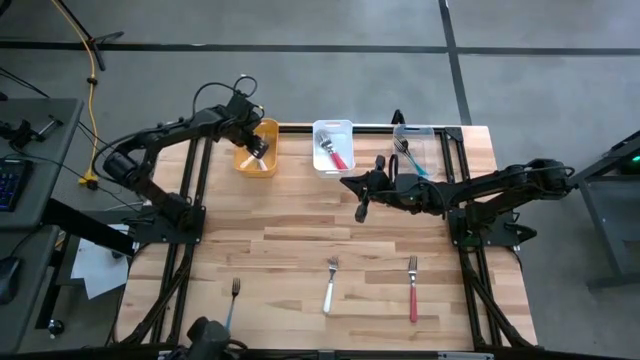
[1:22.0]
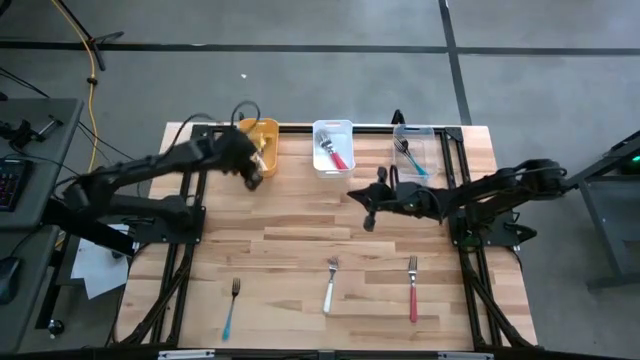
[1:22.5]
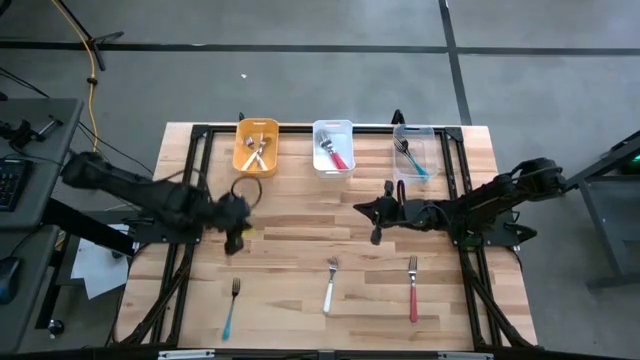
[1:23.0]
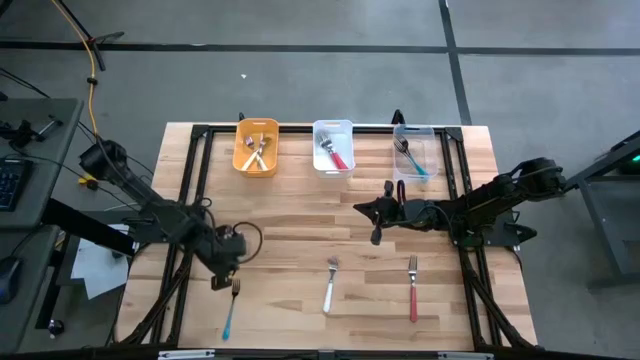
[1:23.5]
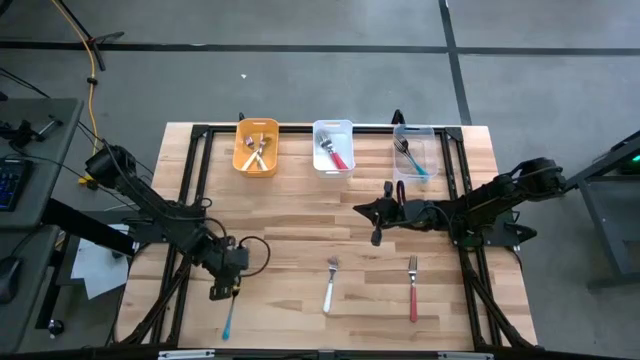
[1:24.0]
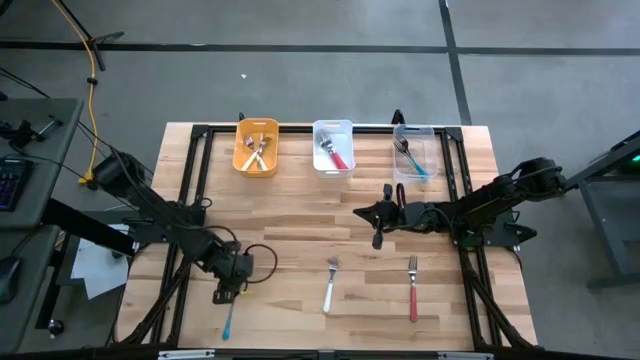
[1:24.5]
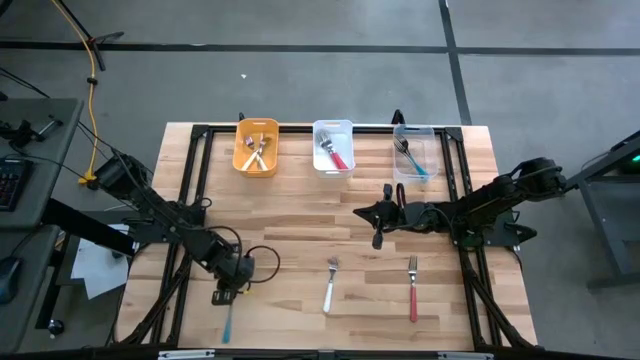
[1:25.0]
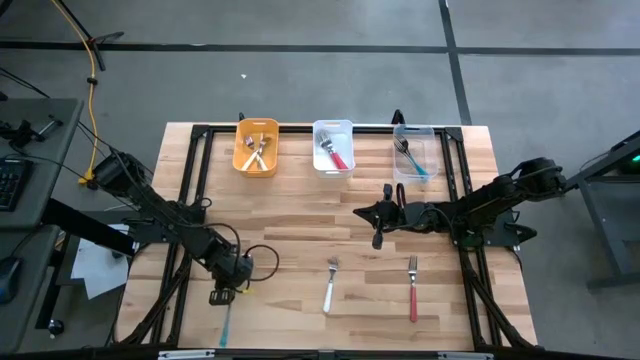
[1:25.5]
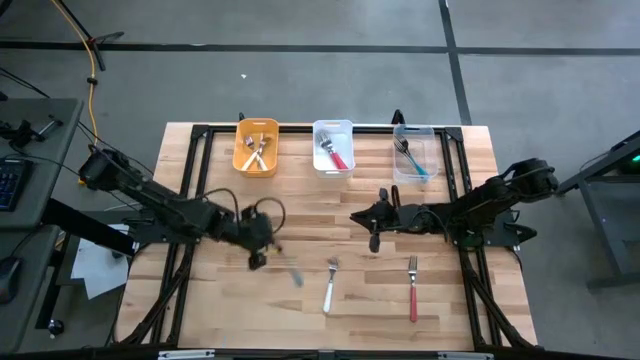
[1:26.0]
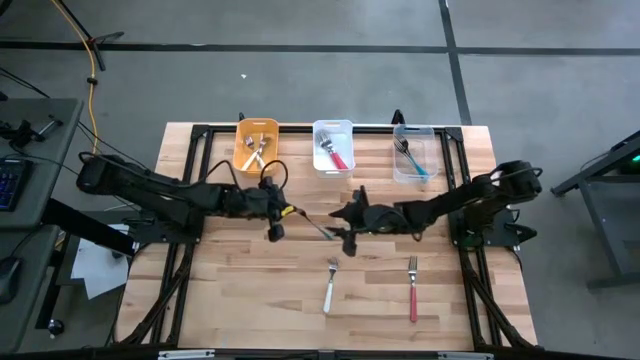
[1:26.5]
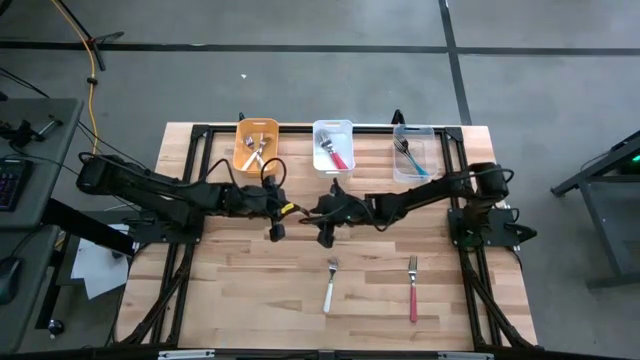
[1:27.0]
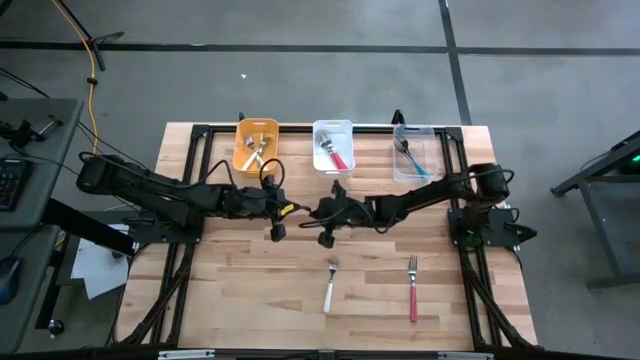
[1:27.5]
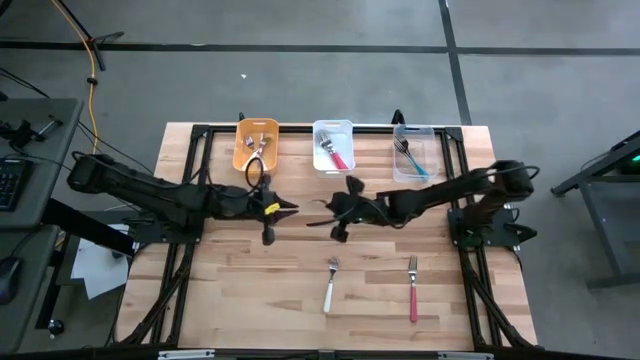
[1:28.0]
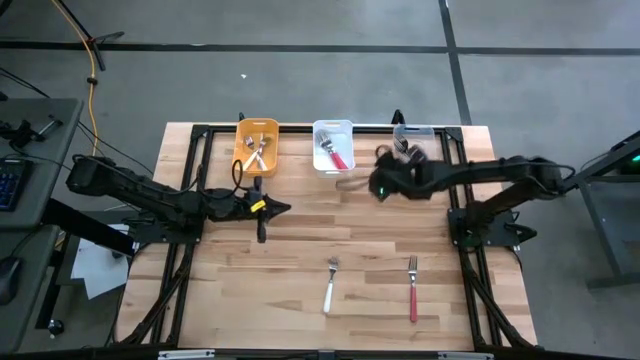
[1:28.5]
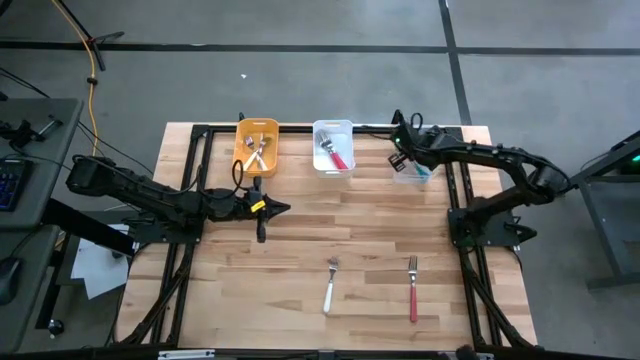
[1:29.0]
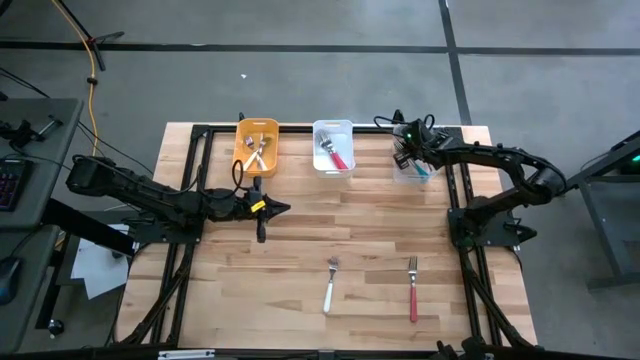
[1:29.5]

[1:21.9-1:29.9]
Task: Sort silverware by color (type)
Put the blue fork into the transparent bin

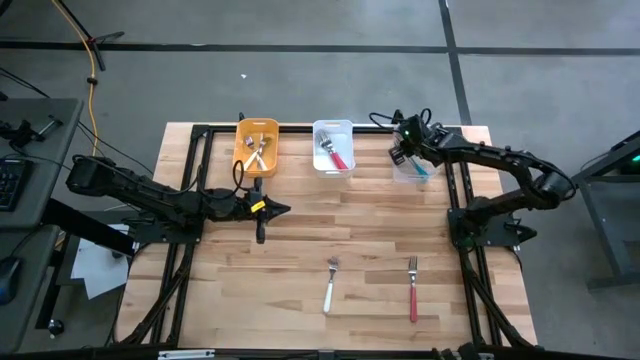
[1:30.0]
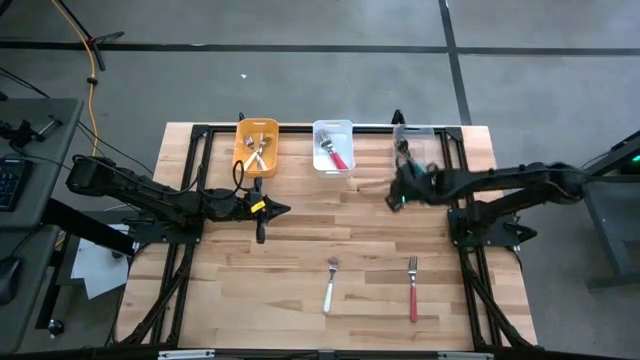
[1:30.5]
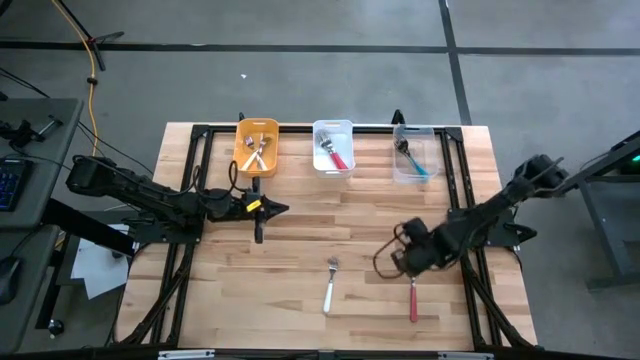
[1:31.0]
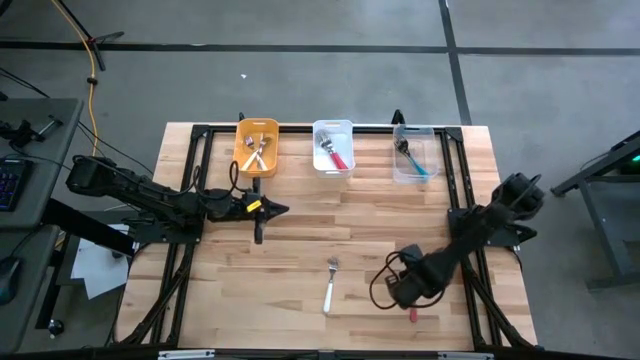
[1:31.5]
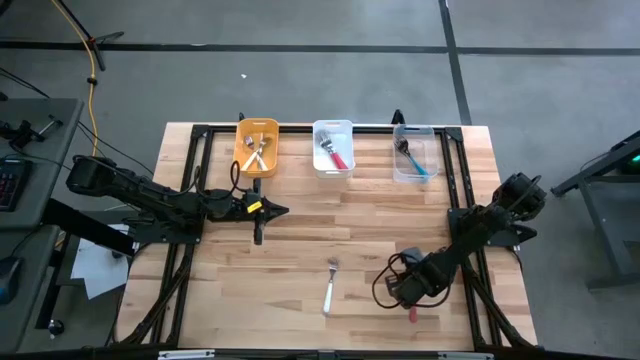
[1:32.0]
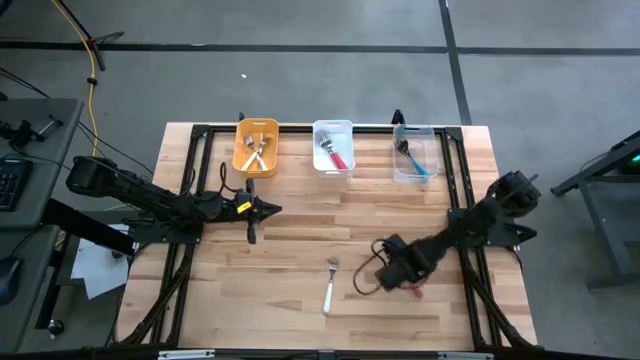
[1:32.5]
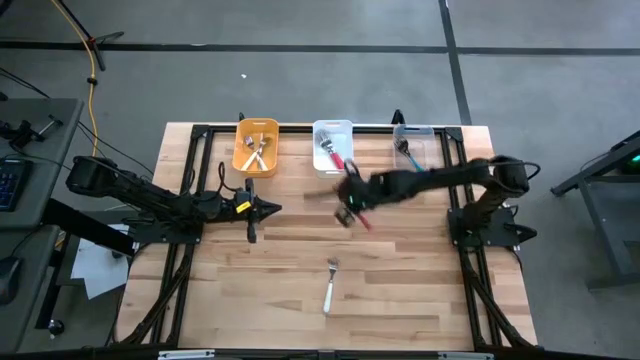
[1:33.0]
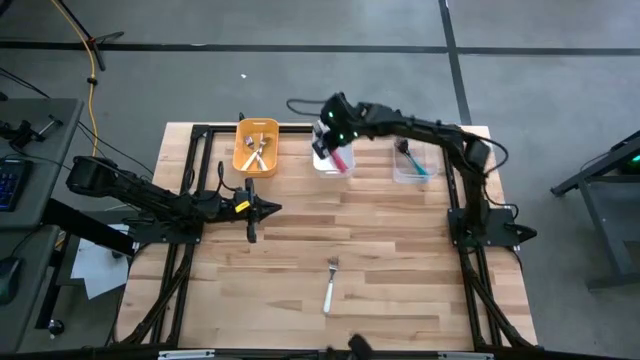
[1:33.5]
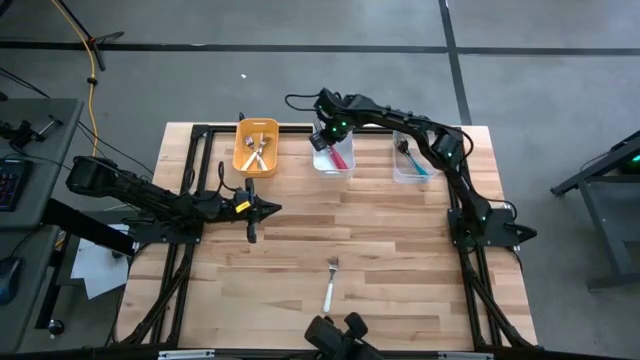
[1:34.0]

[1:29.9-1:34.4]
Put the pink fork into the white bin

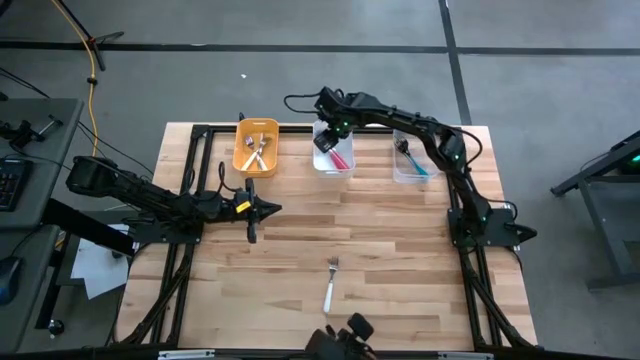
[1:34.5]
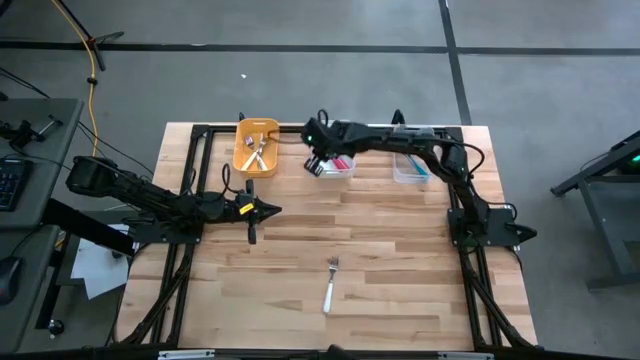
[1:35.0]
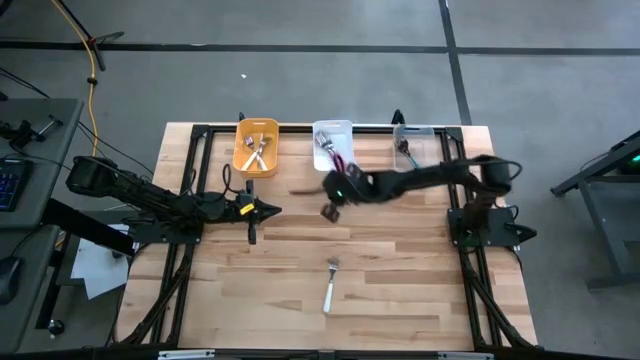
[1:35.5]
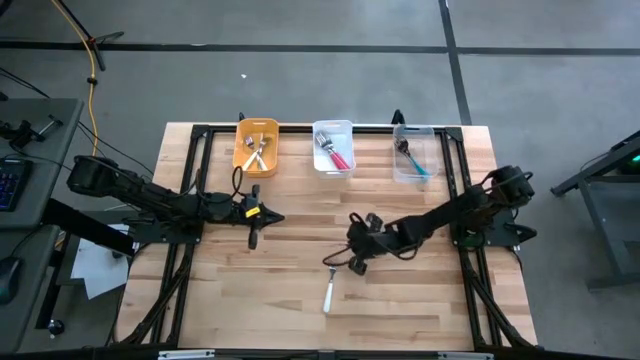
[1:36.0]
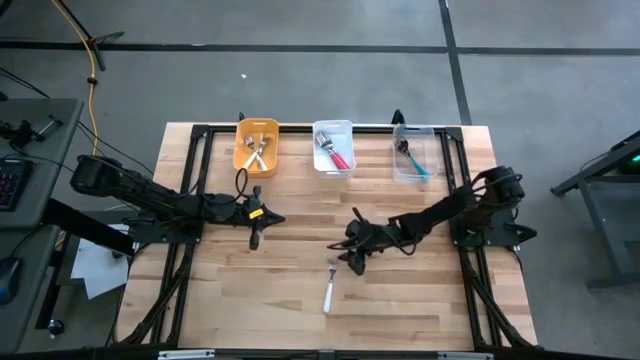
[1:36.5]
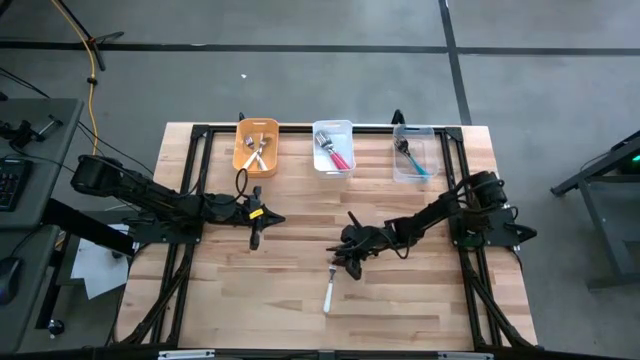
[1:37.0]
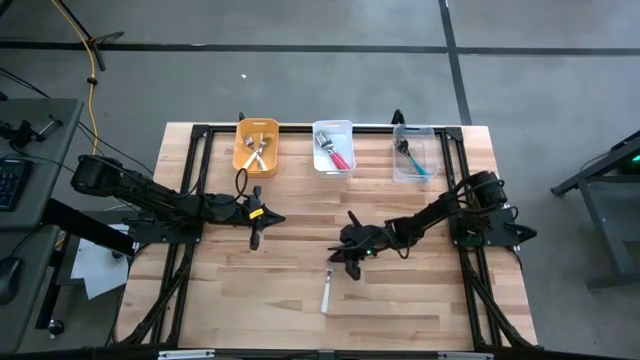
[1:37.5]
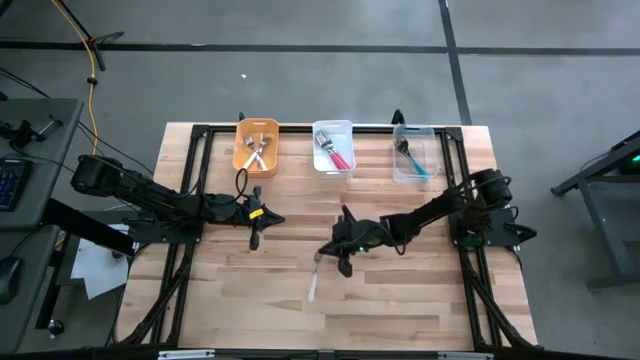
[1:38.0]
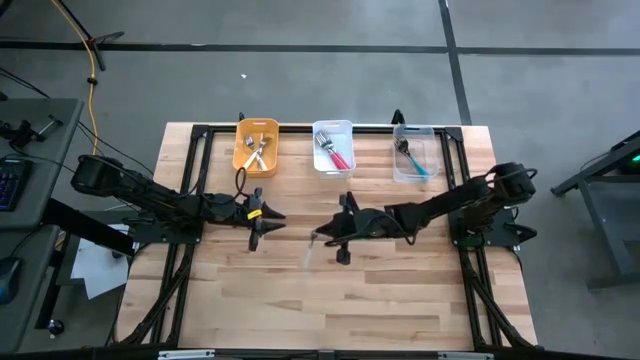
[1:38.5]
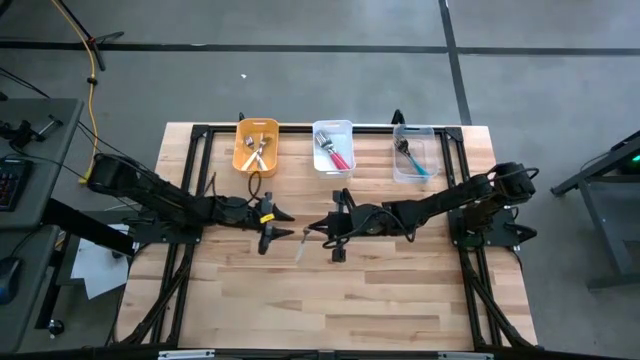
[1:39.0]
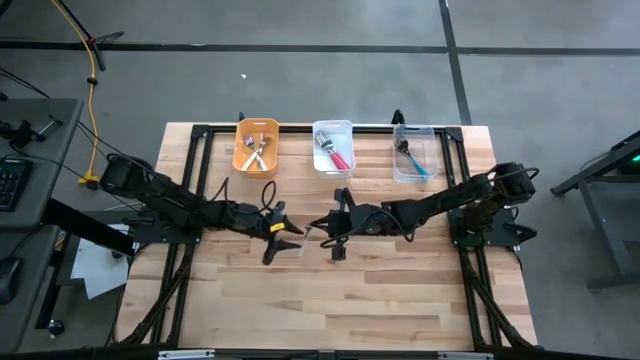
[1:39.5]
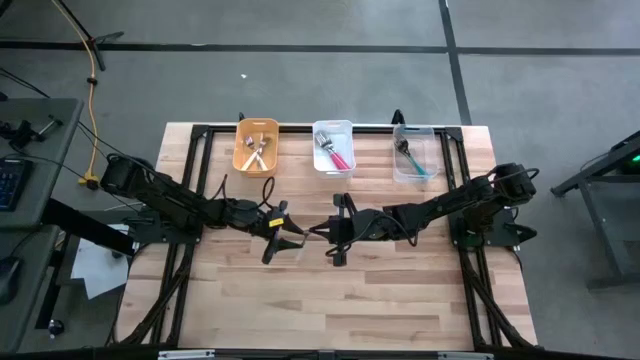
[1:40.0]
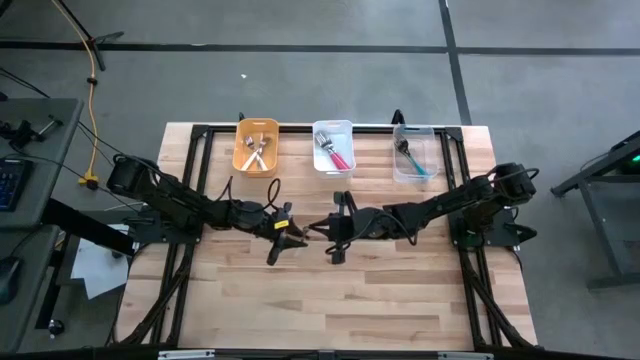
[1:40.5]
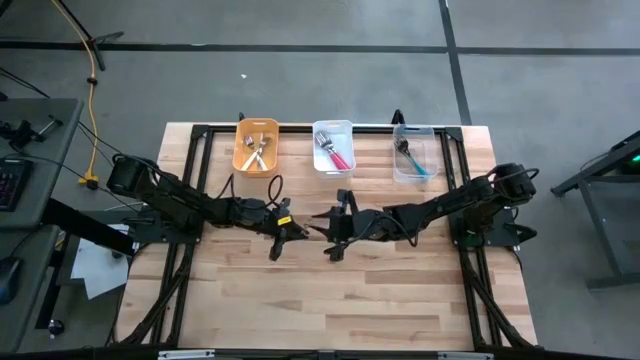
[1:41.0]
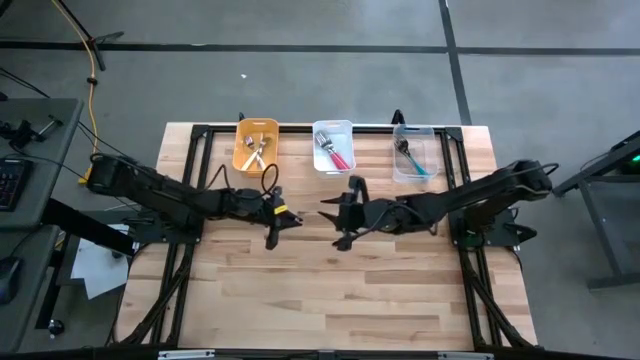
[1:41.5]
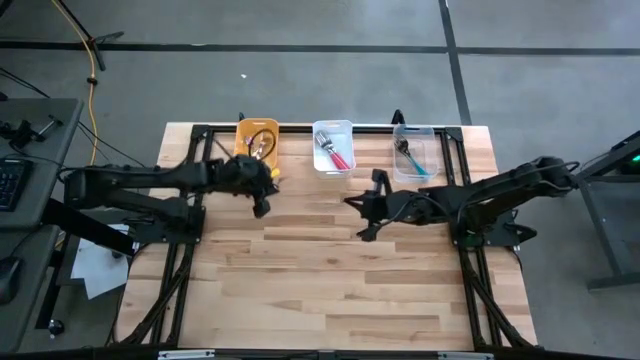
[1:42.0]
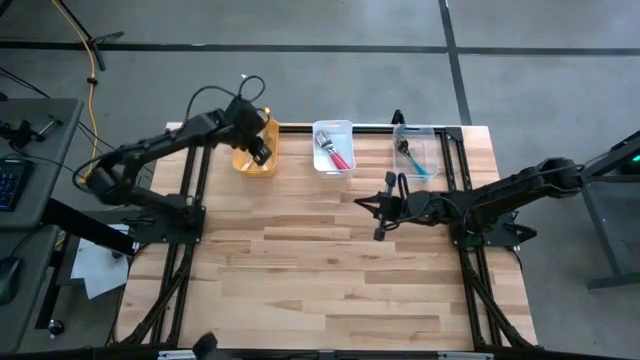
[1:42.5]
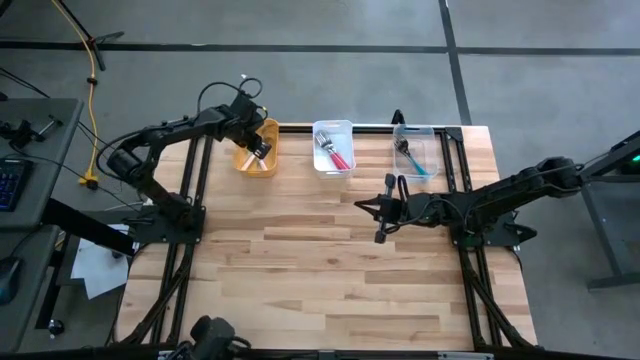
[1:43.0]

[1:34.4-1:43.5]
Put the white fork into the yellow bin

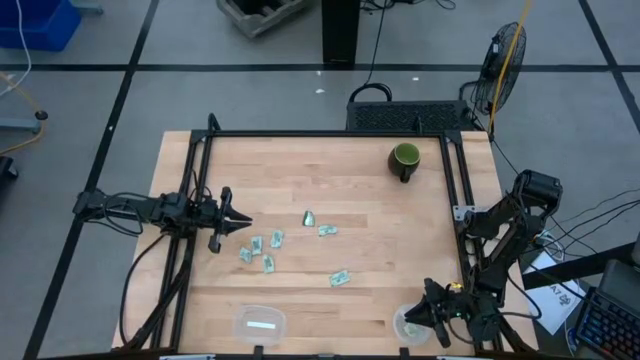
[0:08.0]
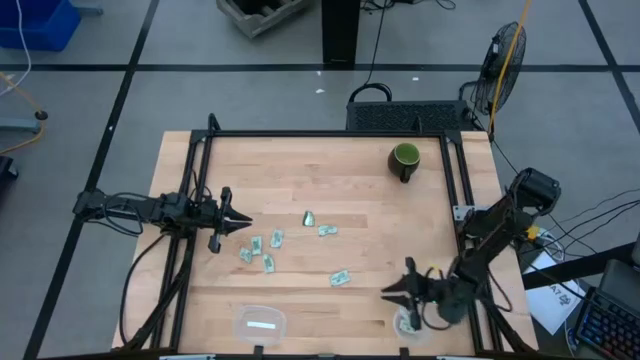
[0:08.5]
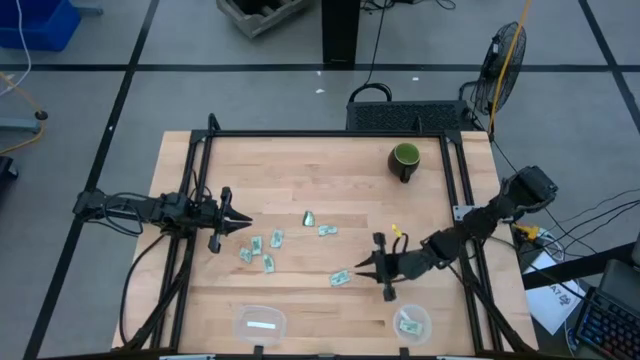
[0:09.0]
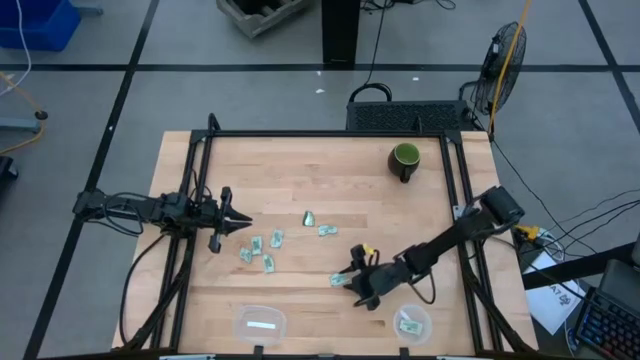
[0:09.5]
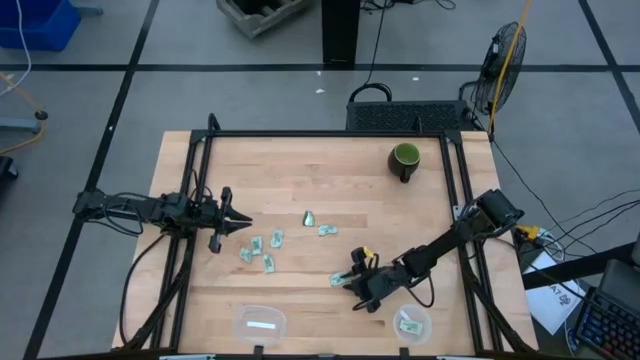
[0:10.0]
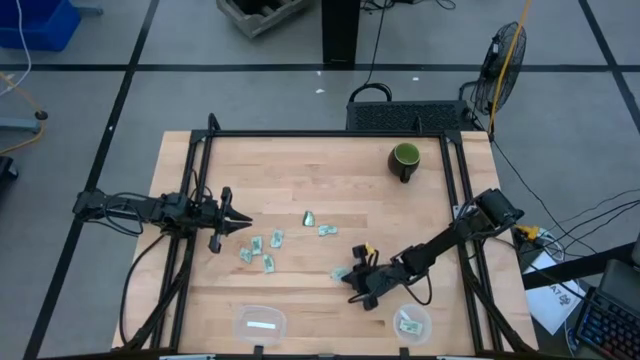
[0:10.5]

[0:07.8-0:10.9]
Task: Pick and place Stevia / Truvia into bins
Put the stevia packet into the right transparent container
